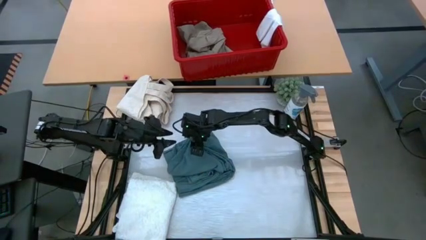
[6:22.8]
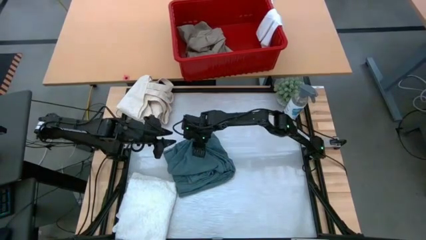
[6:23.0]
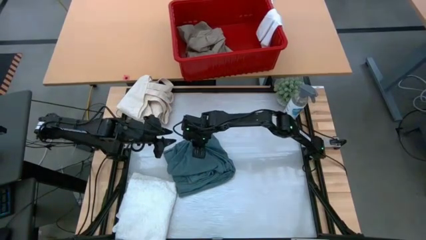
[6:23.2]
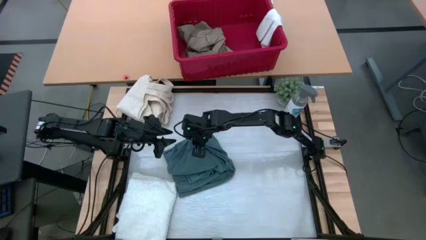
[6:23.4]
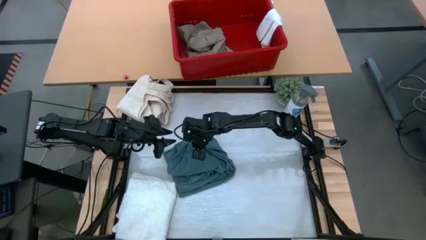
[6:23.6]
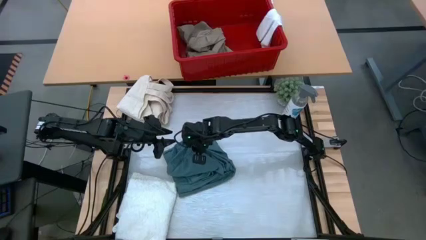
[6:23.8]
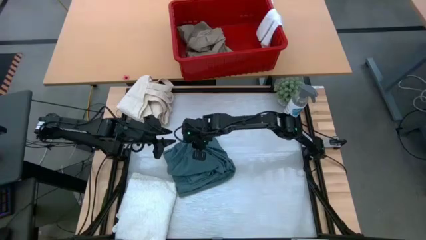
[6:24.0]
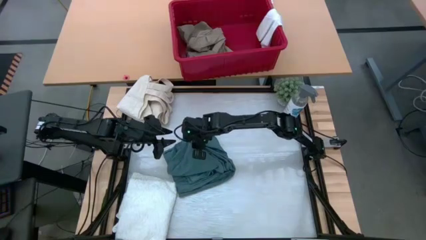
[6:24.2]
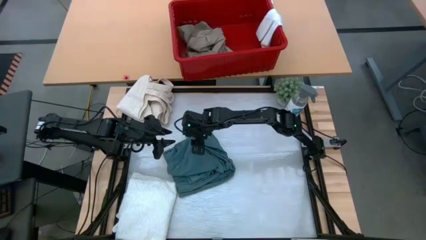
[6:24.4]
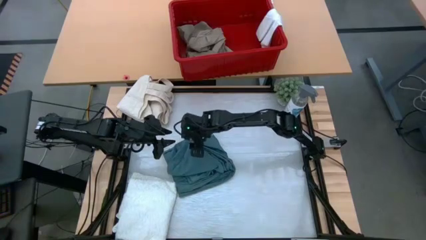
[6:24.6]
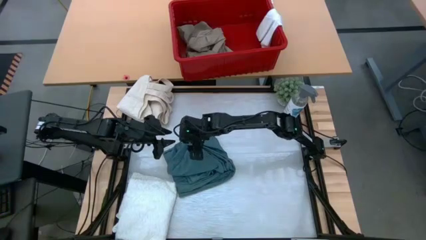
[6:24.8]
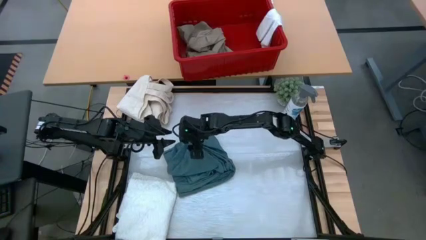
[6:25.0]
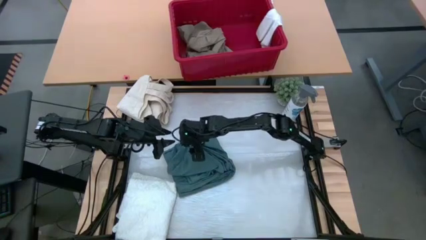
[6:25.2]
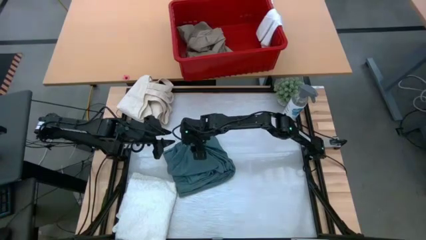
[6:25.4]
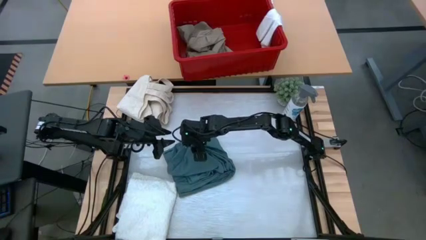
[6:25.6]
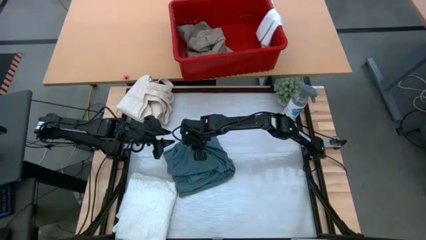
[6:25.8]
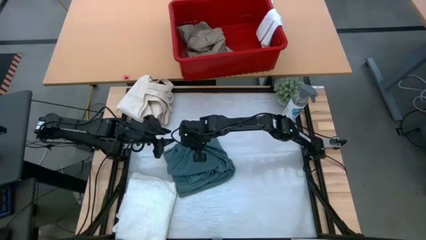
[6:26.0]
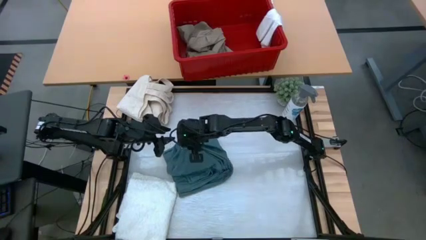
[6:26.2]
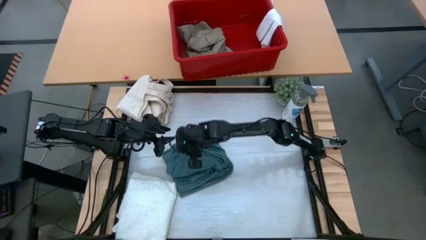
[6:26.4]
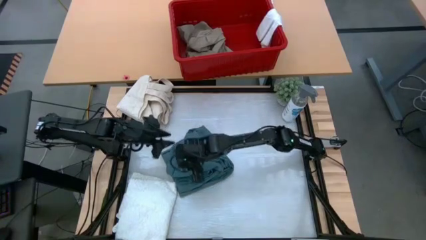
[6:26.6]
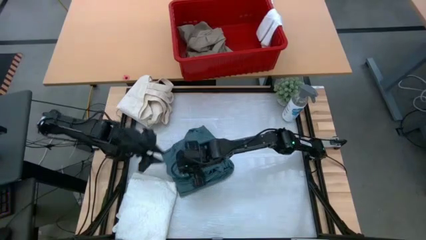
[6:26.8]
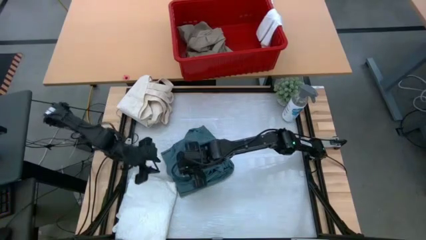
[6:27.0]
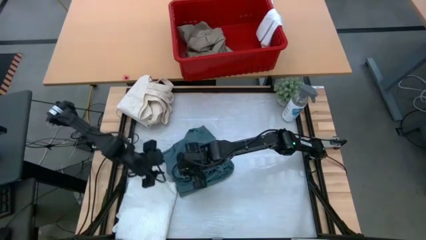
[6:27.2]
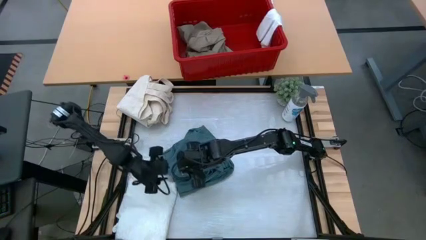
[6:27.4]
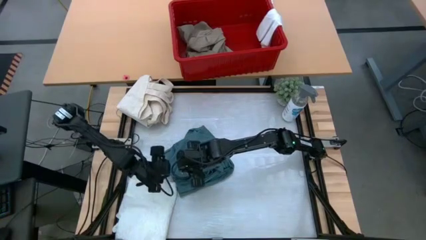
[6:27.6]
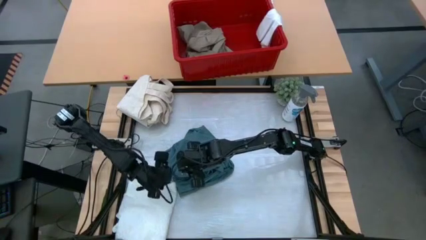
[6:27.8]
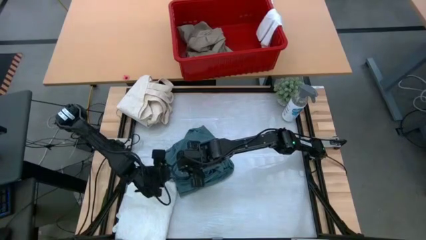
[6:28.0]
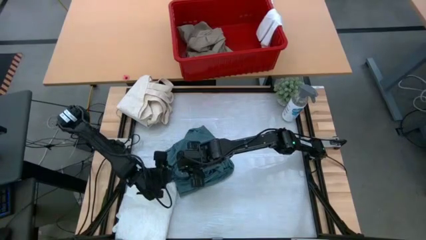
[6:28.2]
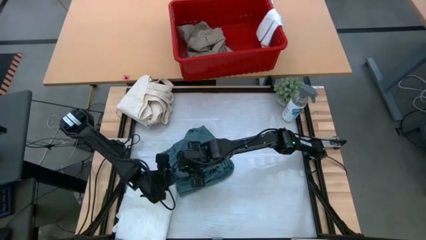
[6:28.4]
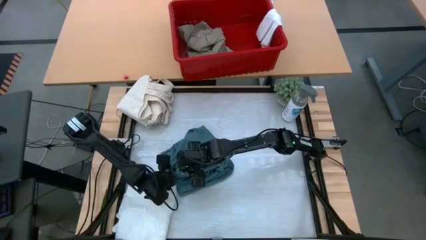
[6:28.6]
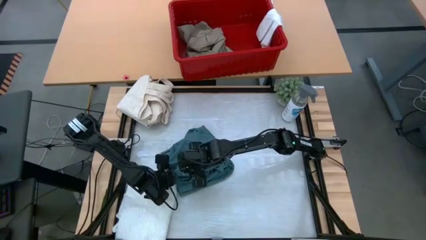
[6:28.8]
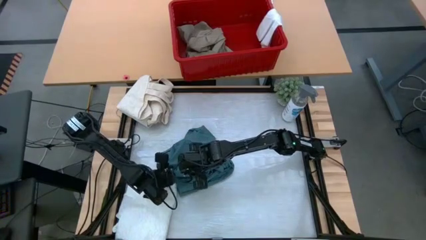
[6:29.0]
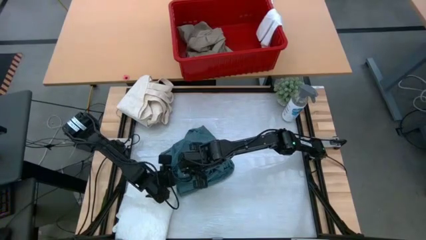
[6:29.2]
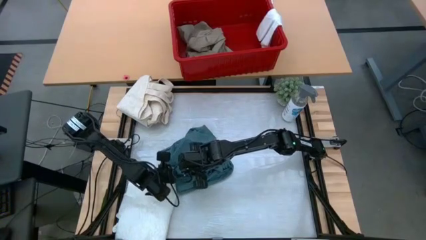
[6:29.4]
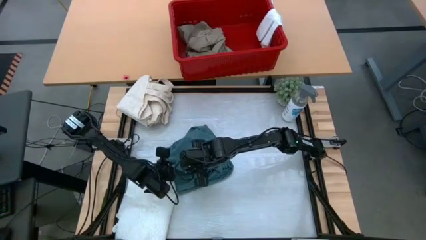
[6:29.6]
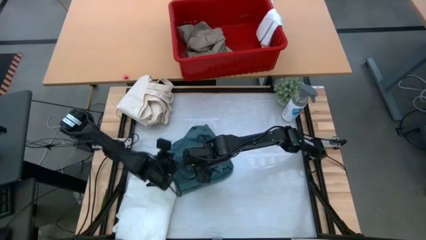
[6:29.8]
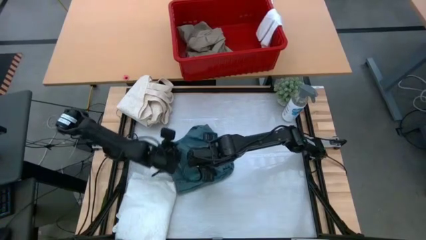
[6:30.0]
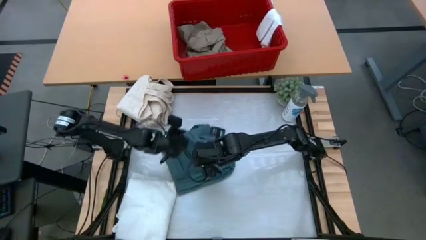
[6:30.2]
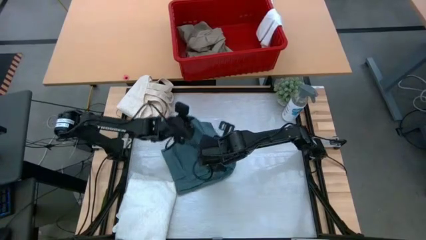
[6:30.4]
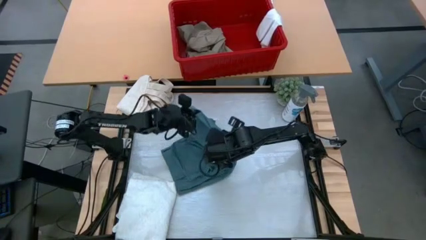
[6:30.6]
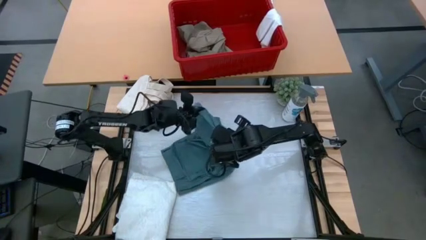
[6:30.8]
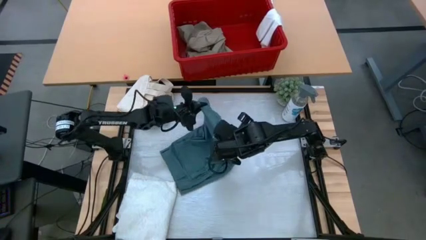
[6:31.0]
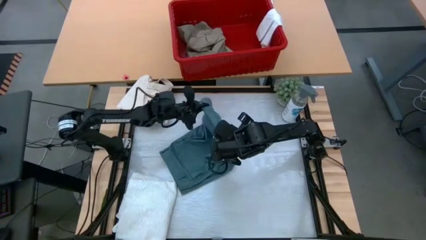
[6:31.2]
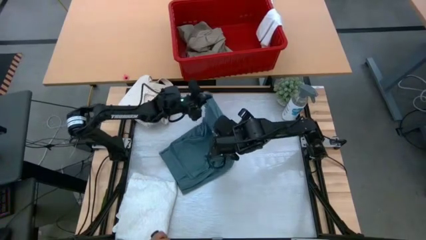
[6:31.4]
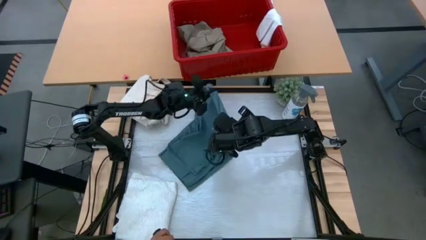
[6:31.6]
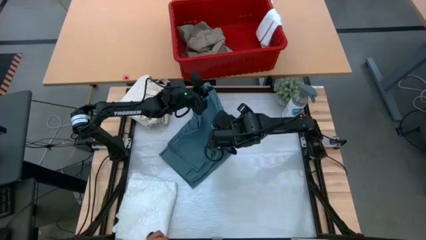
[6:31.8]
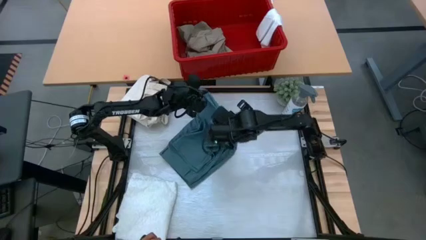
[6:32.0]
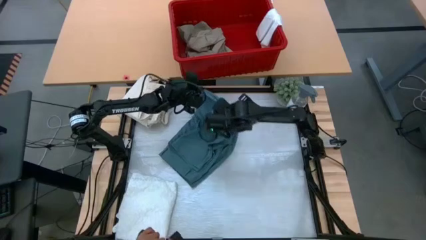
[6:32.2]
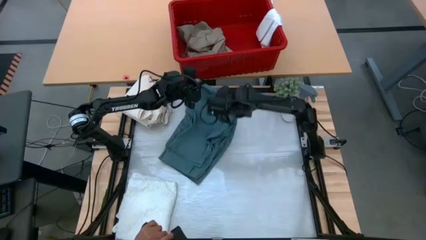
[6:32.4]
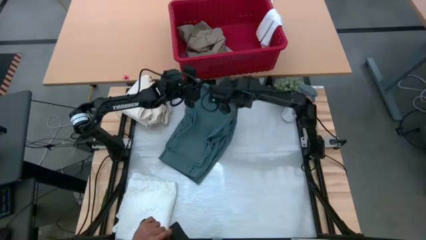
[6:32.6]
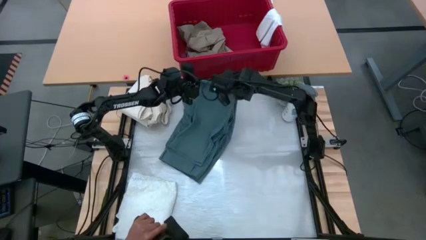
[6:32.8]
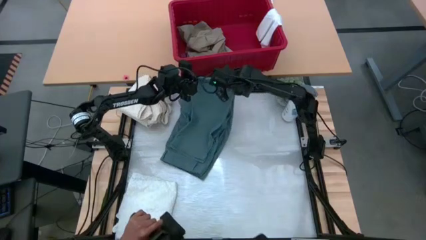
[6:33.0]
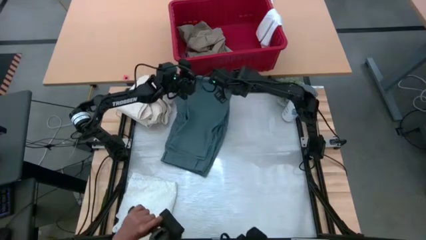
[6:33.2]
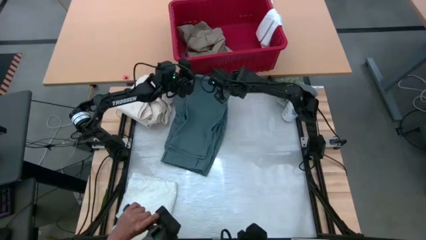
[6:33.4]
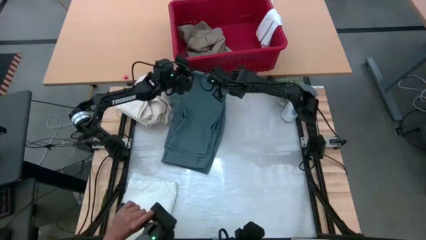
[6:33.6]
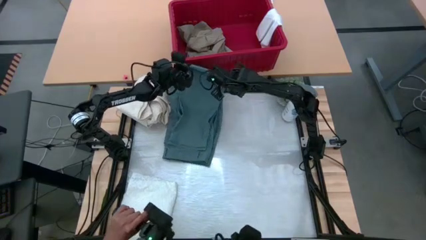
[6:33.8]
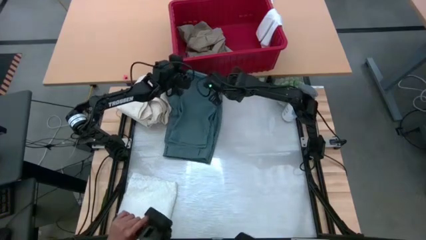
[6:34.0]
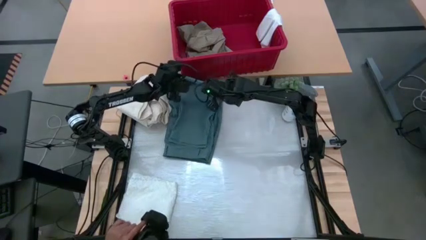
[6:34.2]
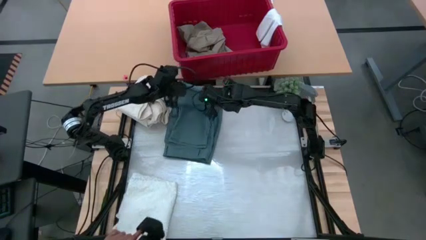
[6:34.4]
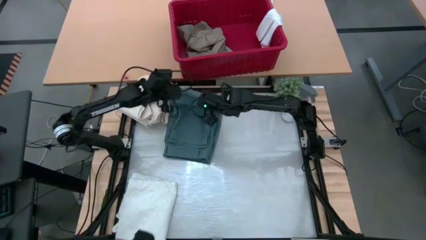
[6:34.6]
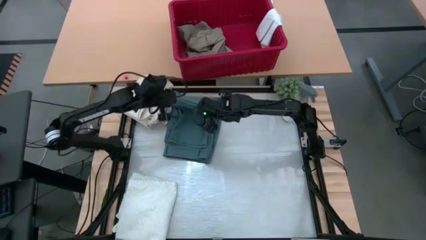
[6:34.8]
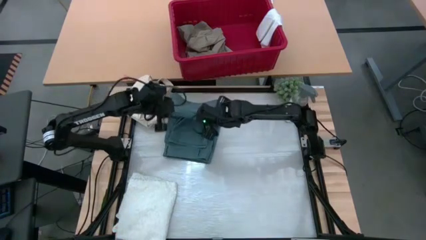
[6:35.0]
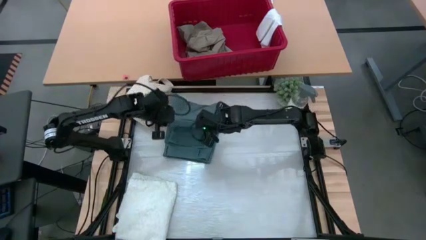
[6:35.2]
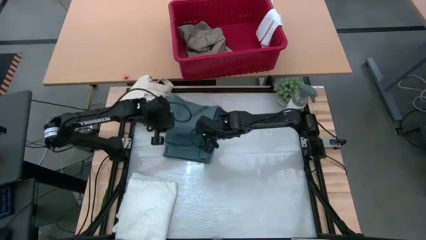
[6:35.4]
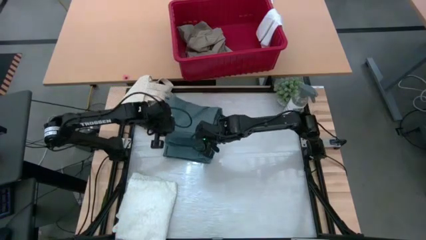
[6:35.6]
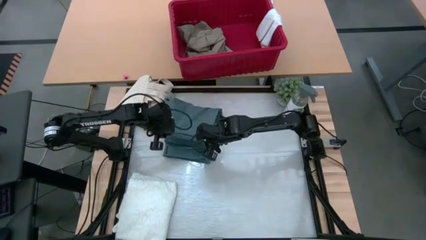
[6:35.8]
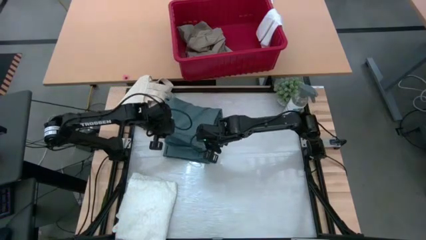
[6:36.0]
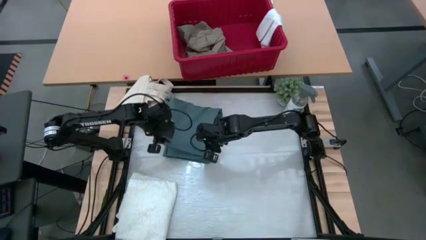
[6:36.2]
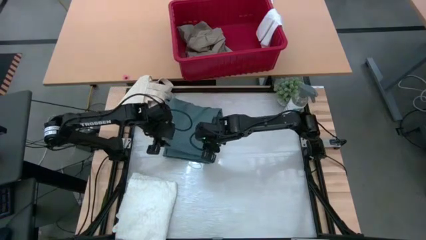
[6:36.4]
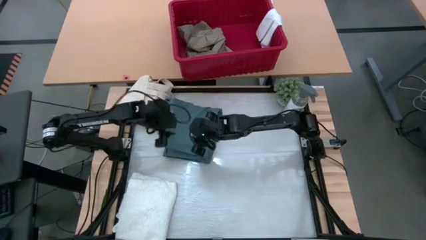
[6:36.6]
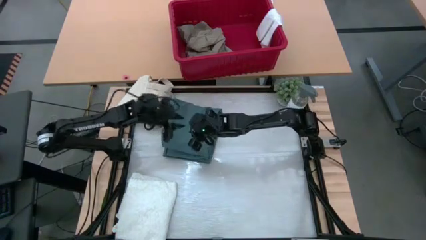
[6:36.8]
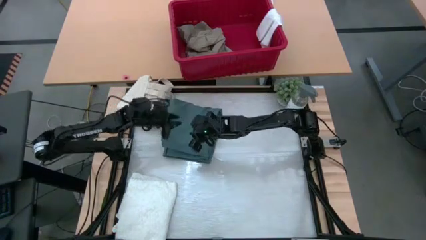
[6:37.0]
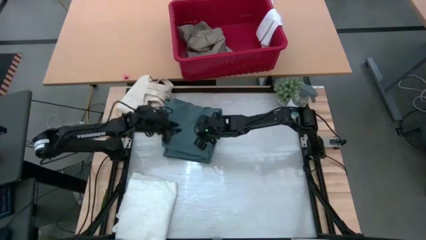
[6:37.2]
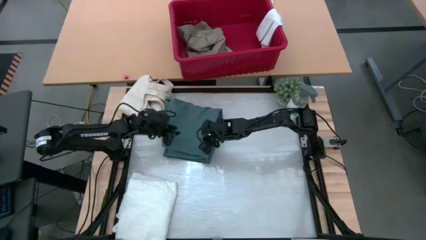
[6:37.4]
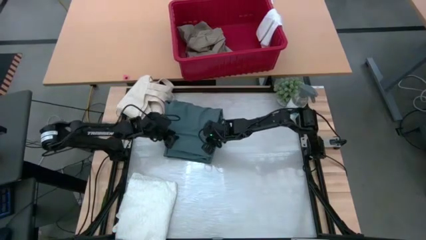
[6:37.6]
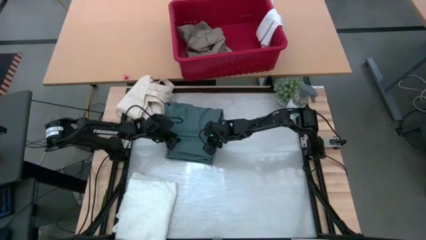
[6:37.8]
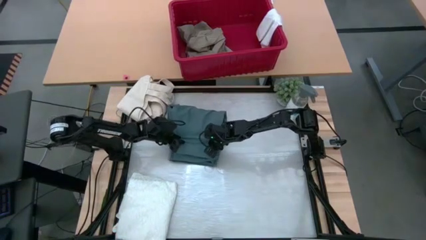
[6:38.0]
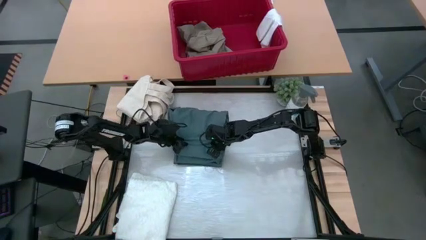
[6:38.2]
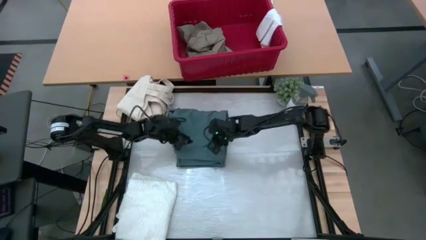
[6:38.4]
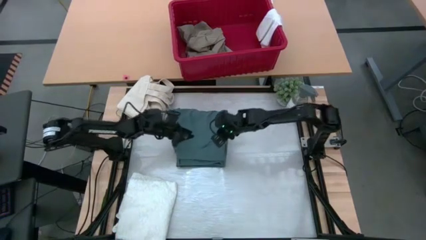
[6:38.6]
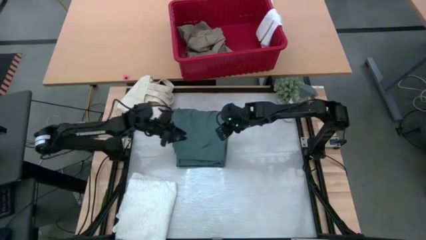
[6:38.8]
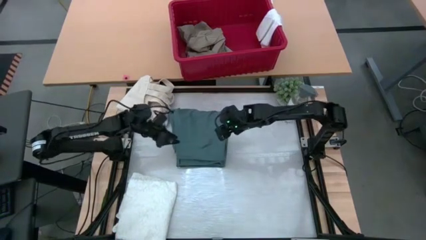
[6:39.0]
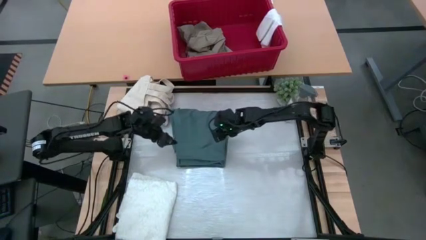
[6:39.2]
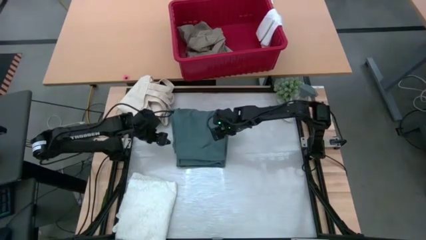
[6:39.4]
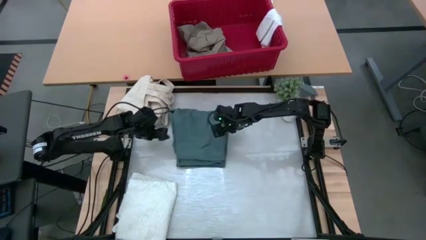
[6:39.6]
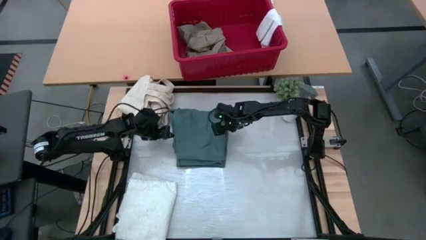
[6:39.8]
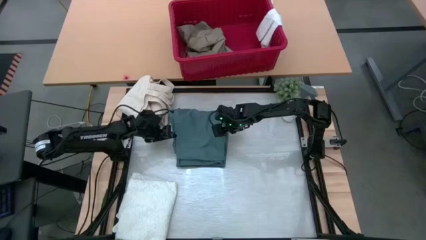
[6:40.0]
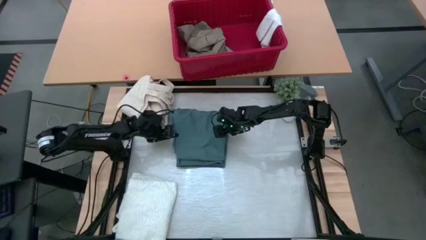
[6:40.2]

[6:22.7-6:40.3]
Task: Fold Laundry from Bin
Fold the blue pants
